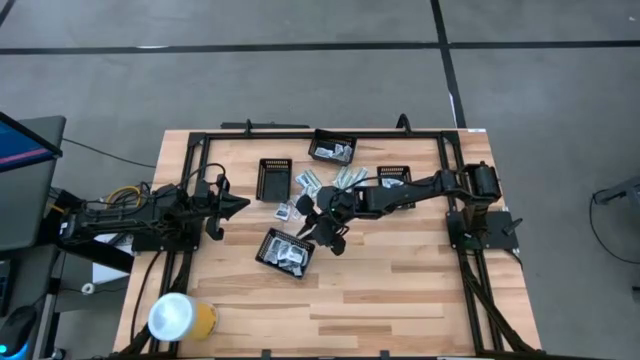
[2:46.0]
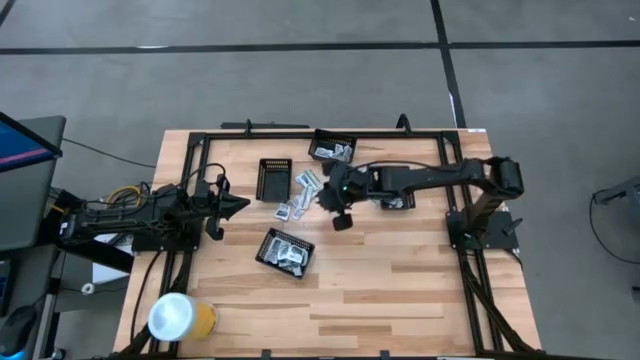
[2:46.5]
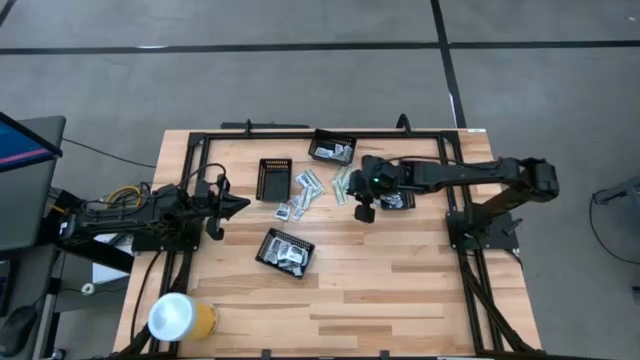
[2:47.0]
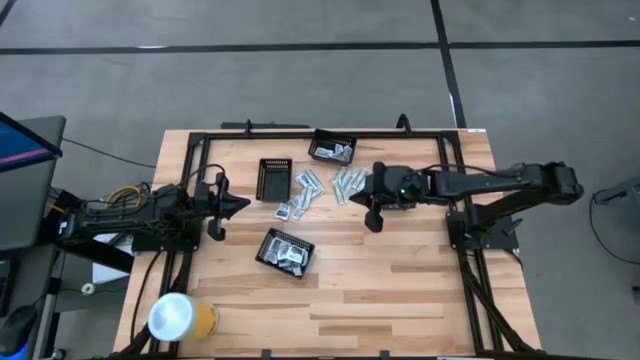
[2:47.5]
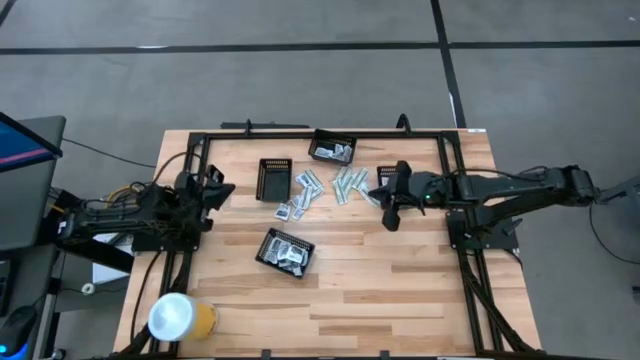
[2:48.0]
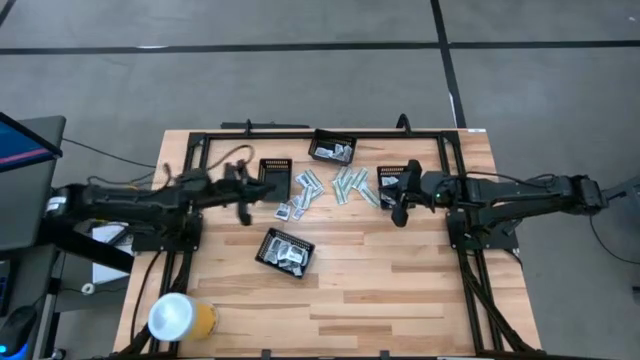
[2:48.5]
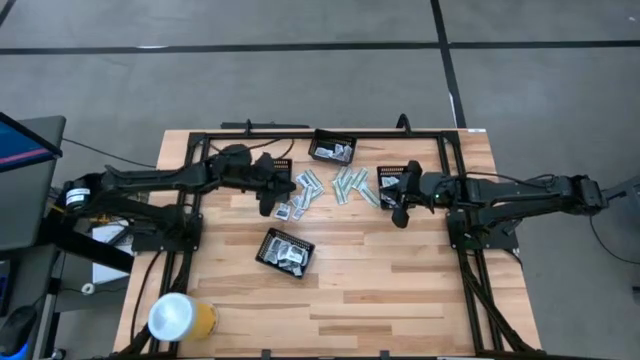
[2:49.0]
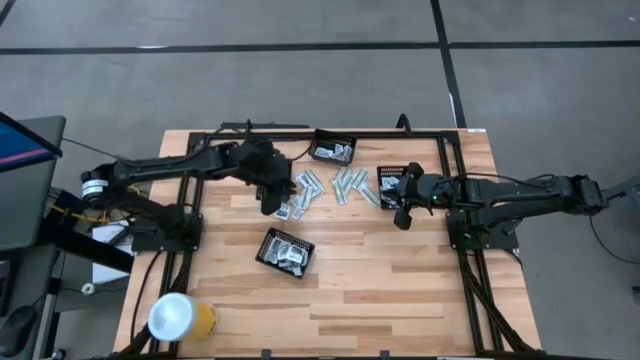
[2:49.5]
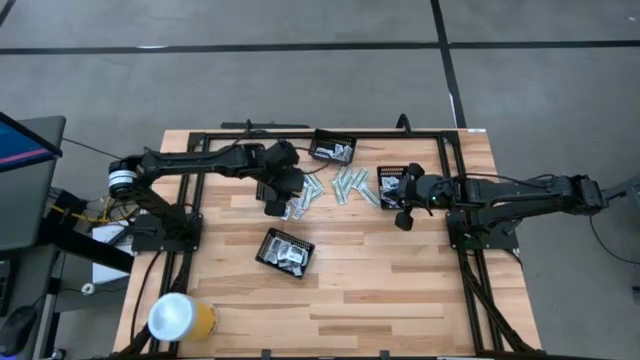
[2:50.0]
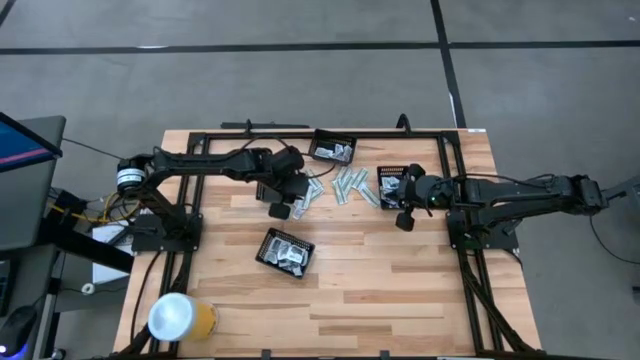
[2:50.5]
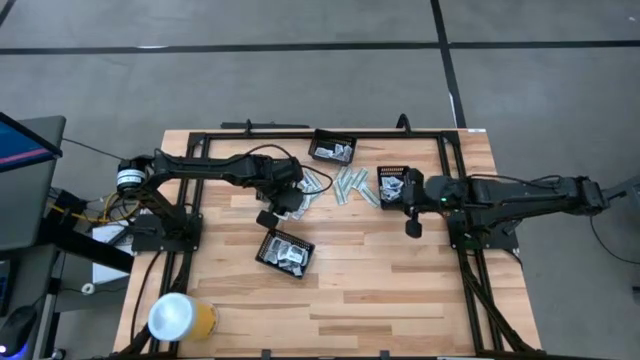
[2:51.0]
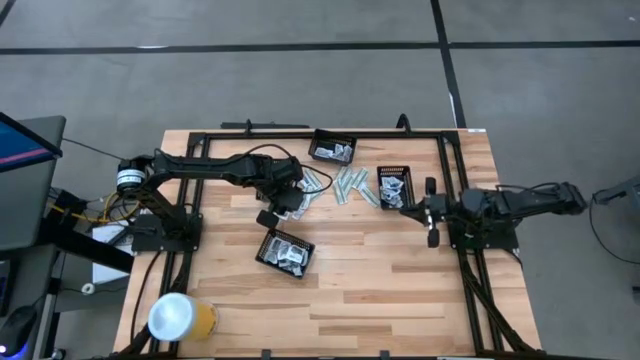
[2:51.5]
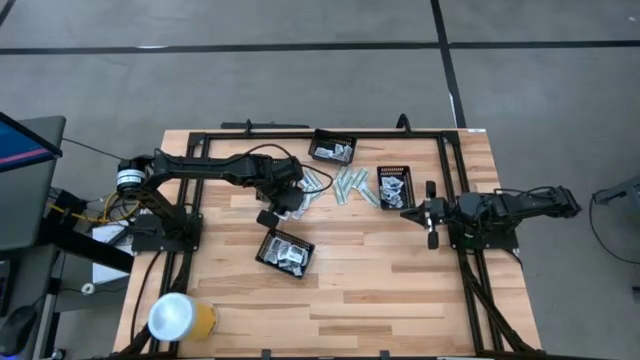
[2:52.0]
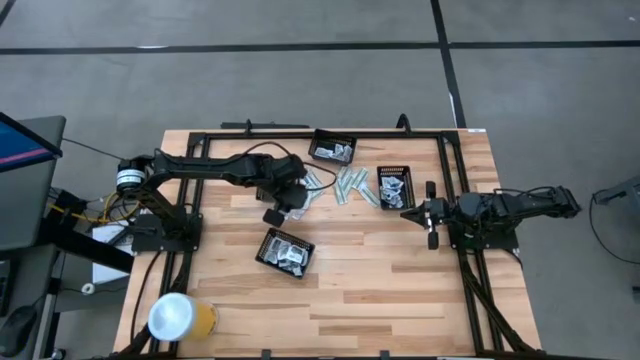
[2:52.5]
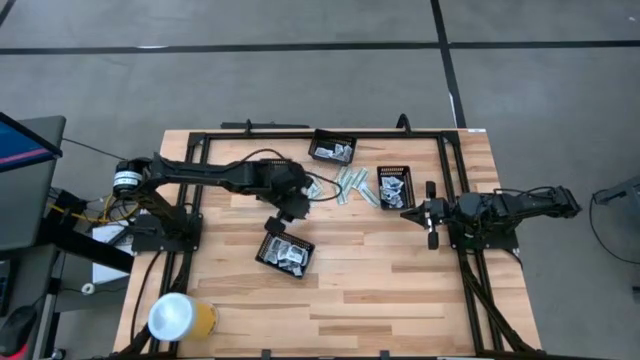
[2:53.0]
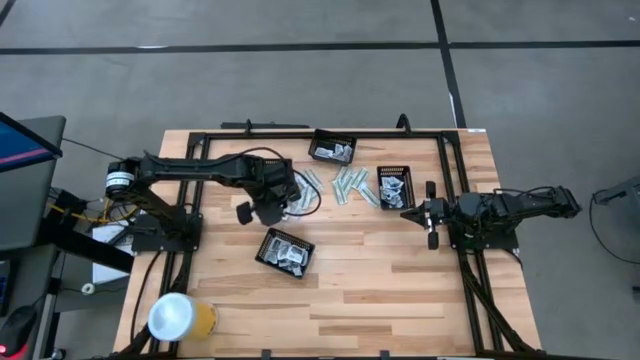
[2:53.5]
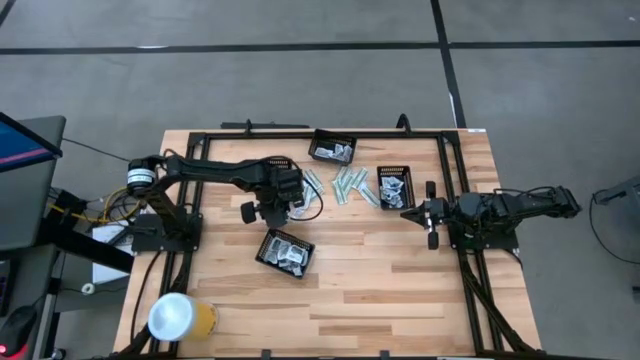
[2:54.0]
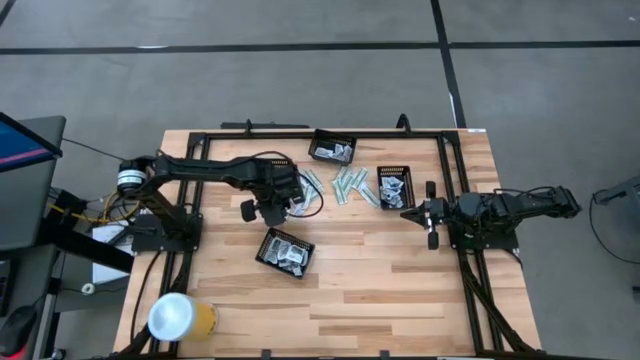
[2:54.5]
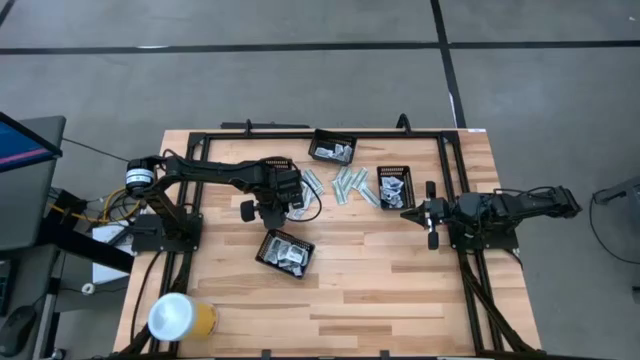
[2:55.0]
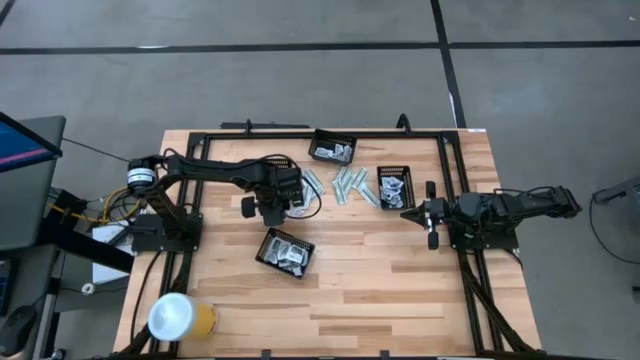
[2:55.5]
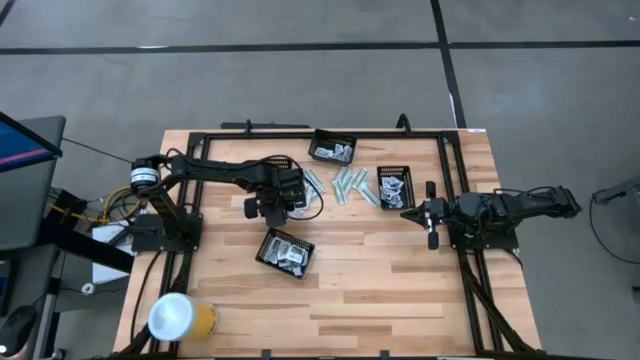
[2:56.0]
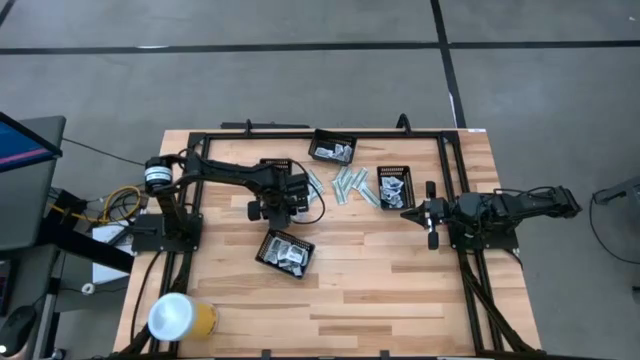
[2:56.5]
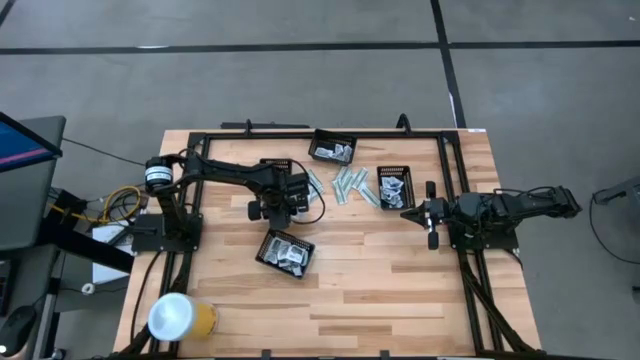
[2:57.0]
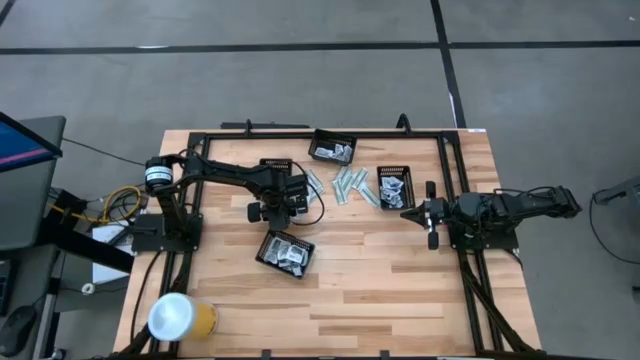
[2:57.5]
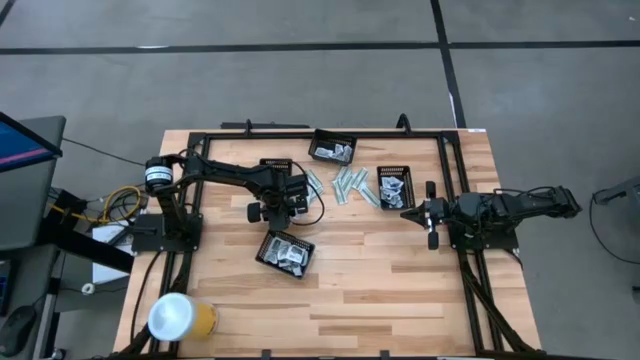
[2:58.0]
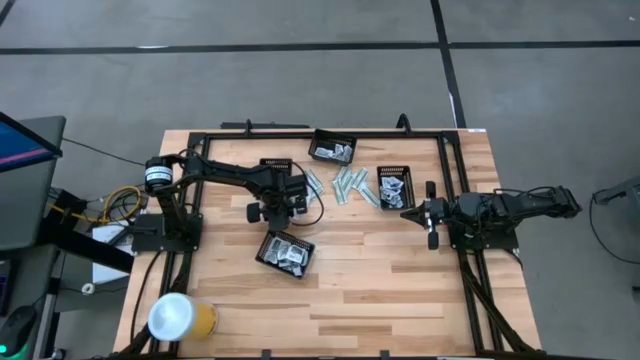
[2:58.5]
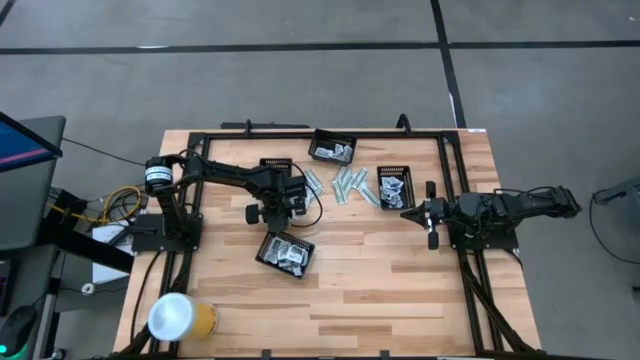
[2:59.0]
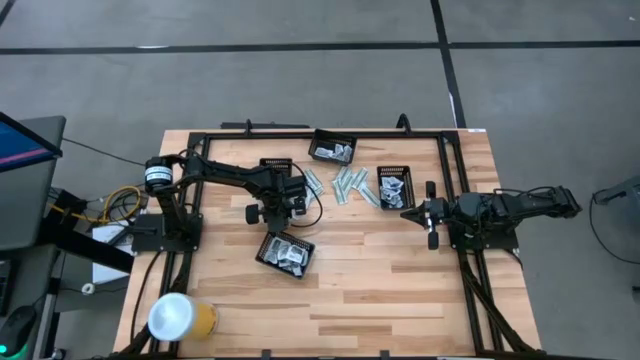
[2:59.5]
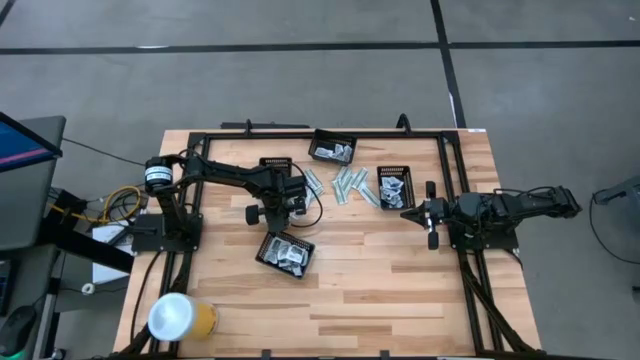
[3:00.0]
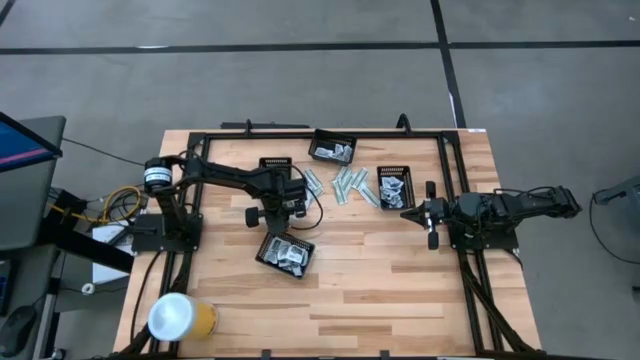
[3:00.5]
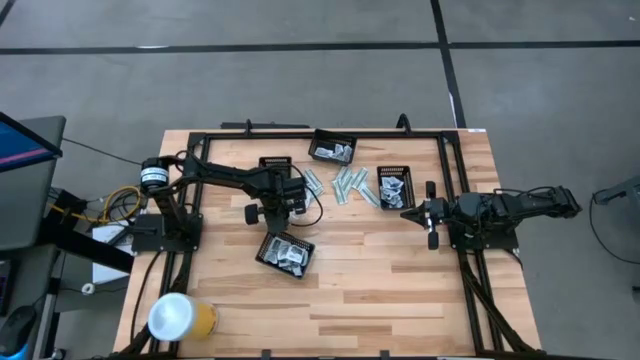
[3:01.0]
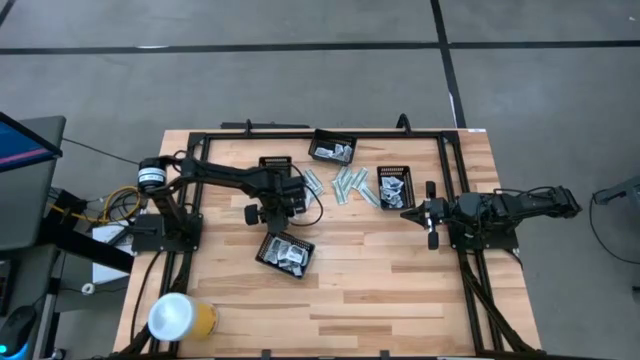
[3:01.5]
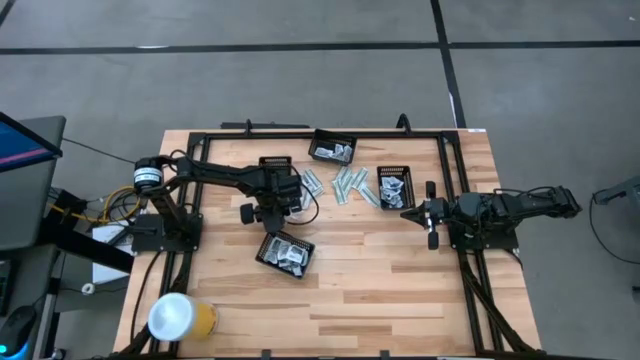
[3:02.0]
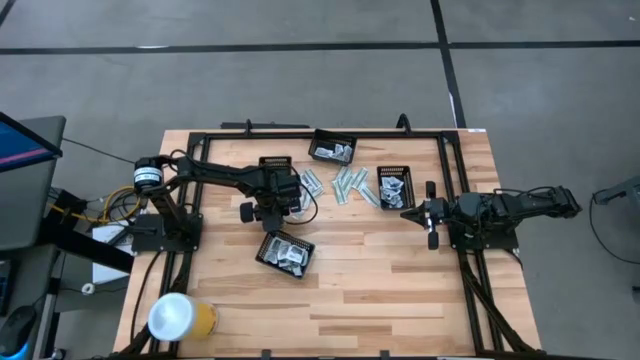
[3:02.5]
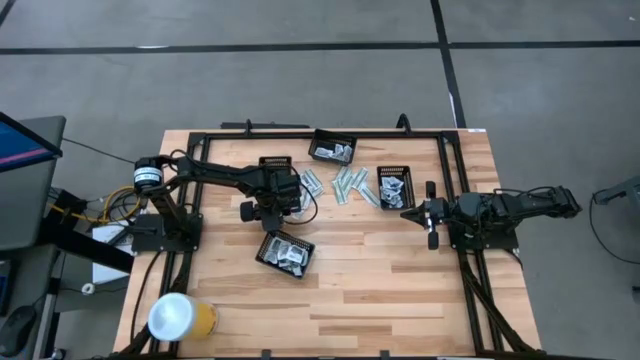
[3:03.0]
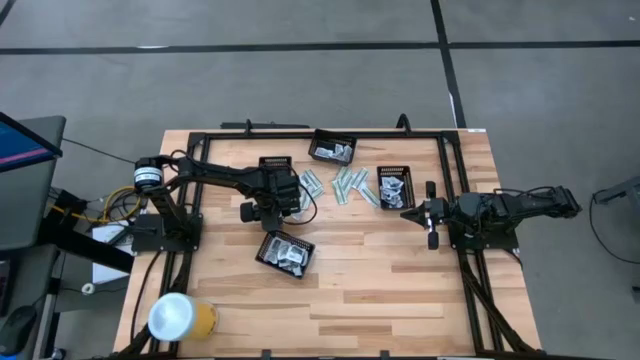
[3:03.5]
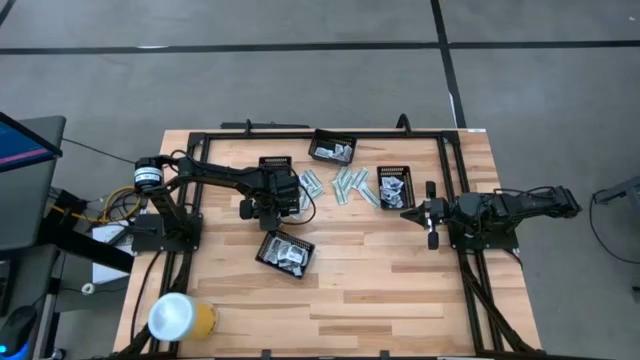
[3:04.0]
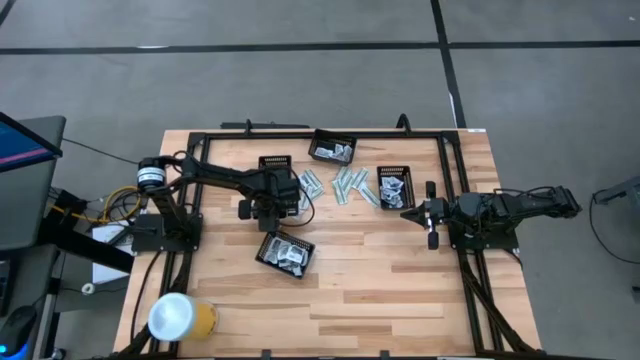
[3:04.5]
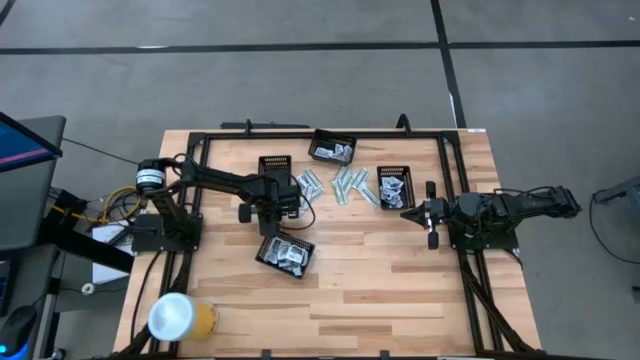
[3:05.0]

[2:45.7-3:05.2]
Task: Pick & Place First Aid Supplies
Put the white towelette pack into the bottom black bin
